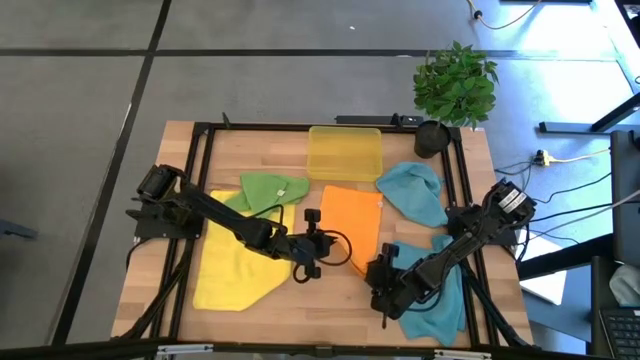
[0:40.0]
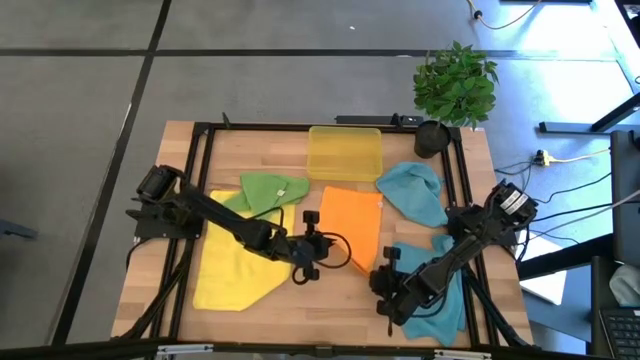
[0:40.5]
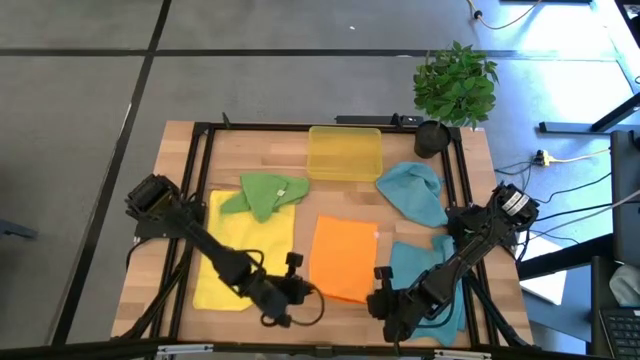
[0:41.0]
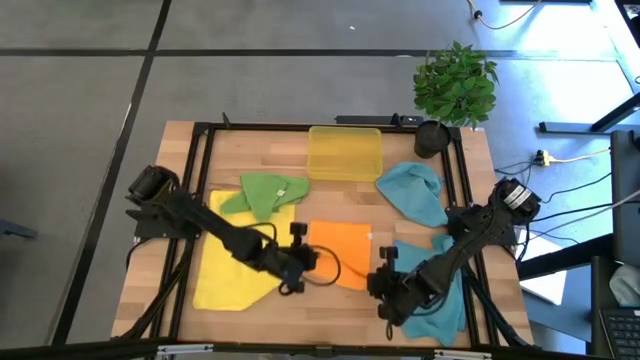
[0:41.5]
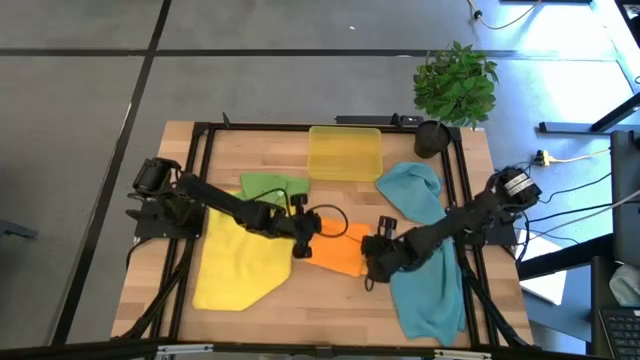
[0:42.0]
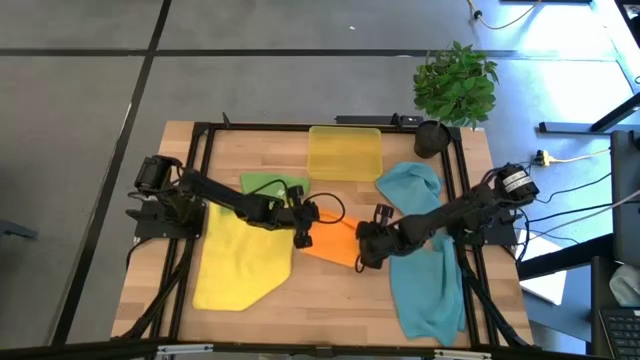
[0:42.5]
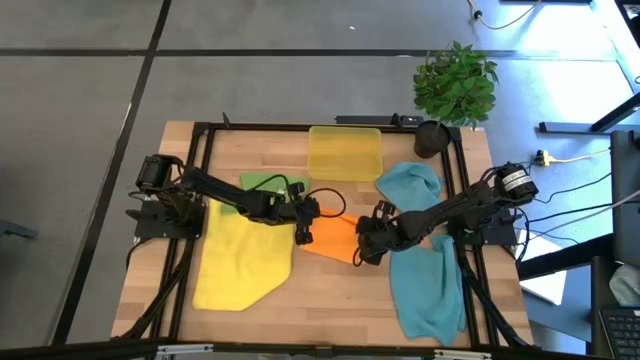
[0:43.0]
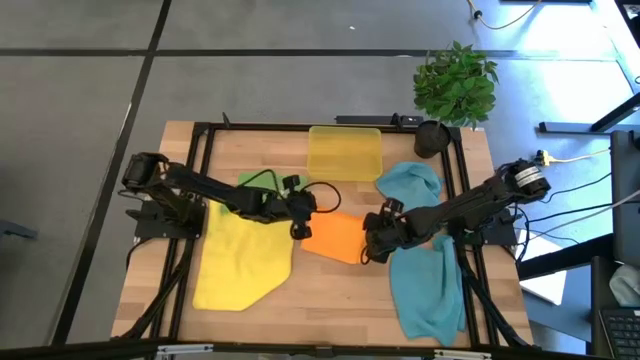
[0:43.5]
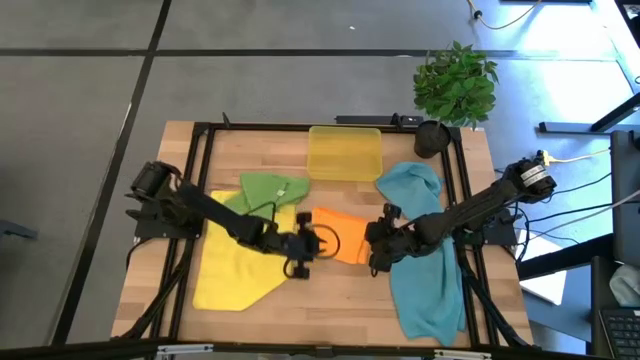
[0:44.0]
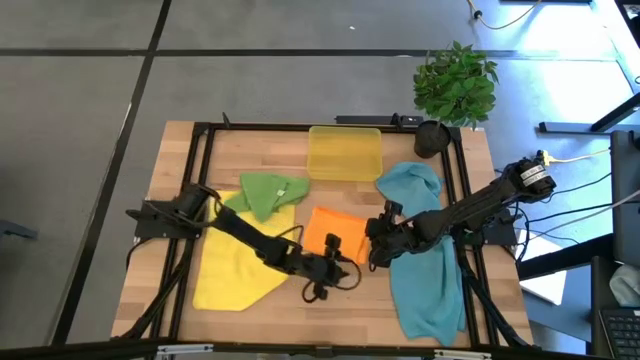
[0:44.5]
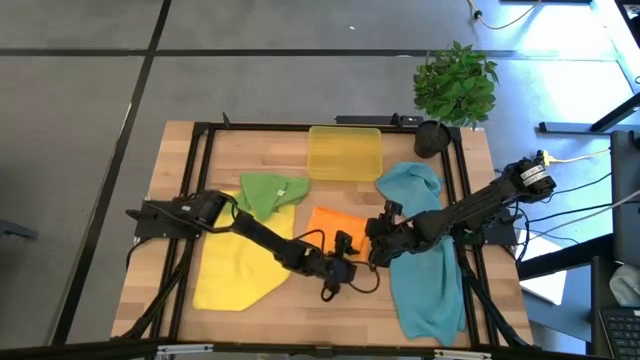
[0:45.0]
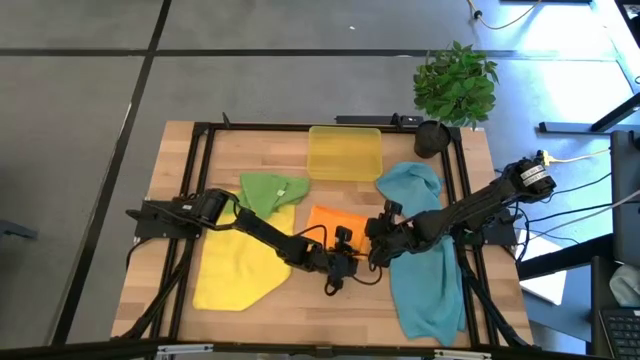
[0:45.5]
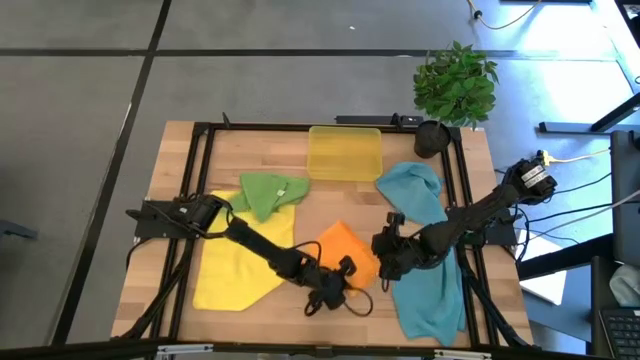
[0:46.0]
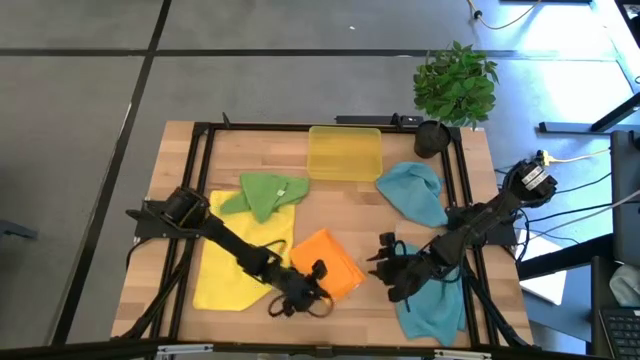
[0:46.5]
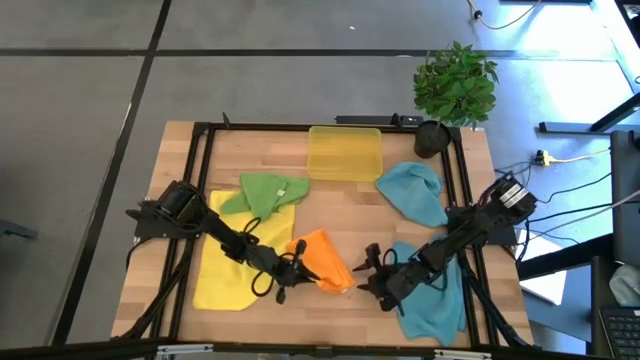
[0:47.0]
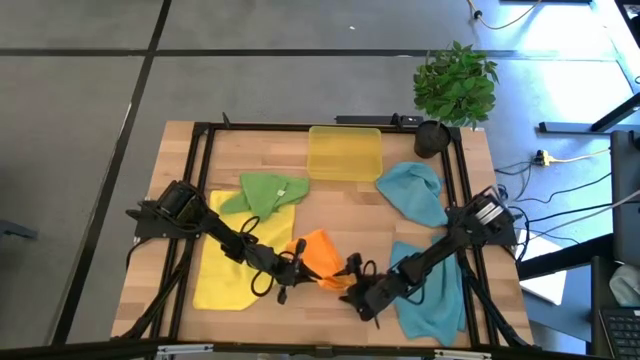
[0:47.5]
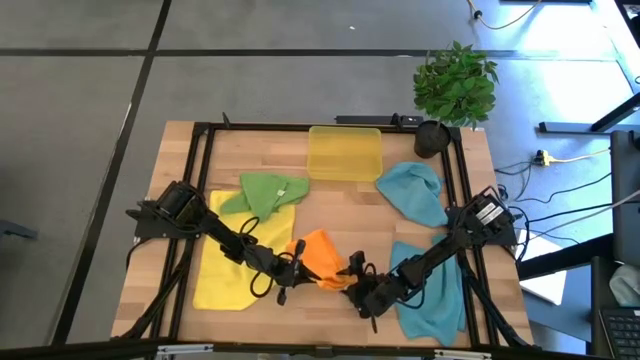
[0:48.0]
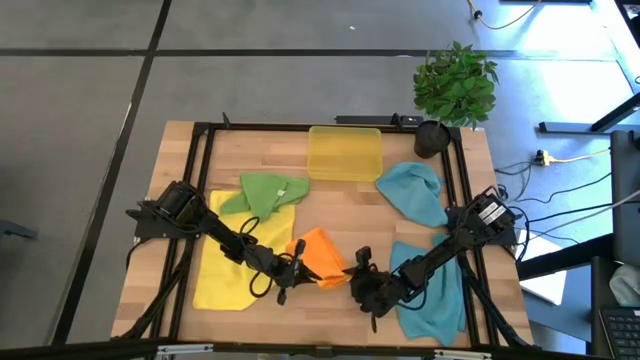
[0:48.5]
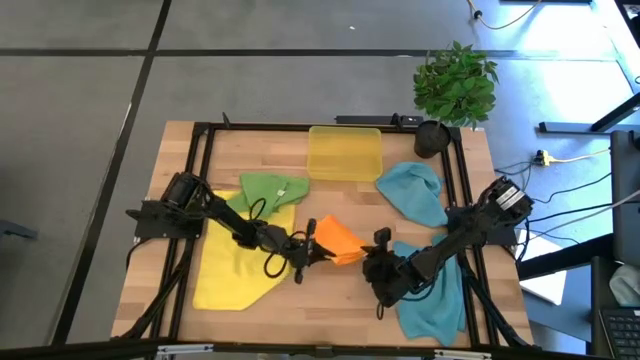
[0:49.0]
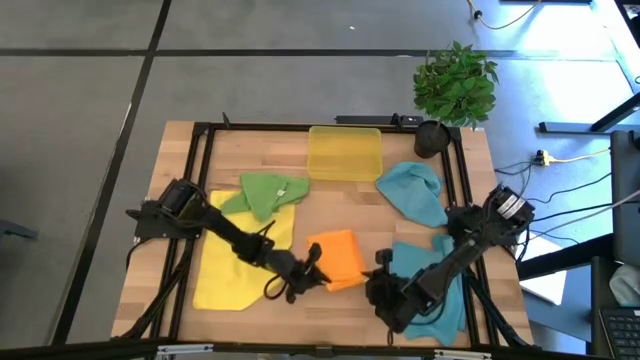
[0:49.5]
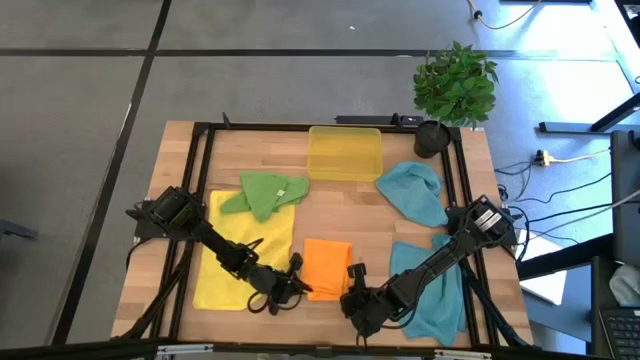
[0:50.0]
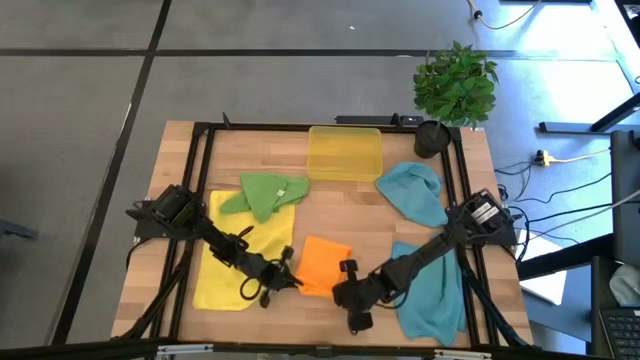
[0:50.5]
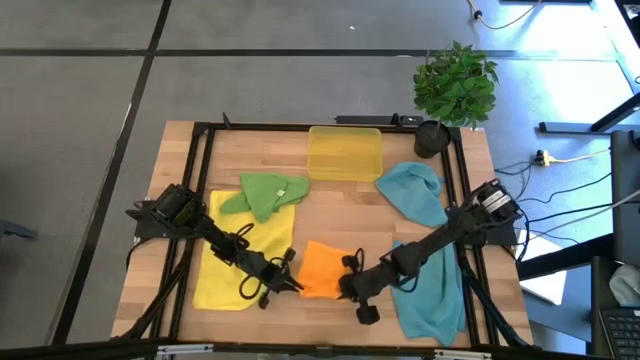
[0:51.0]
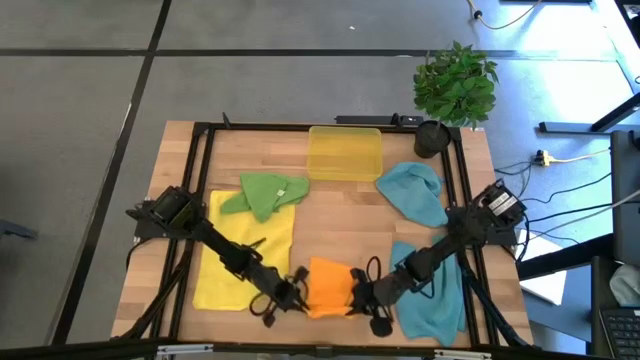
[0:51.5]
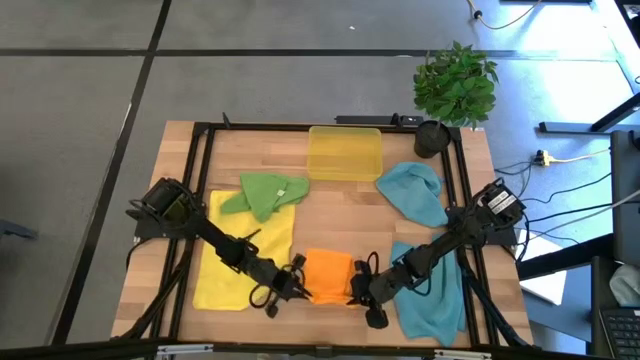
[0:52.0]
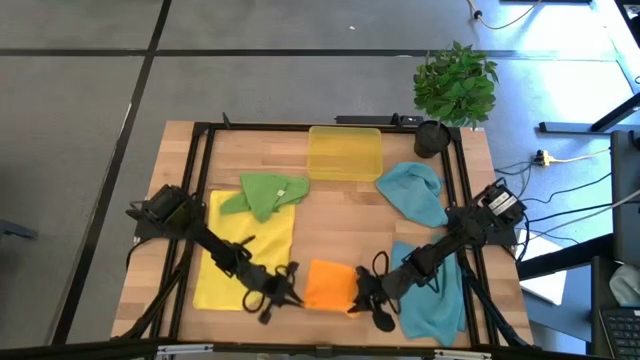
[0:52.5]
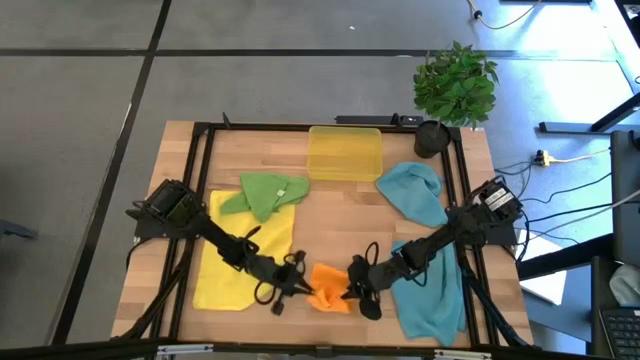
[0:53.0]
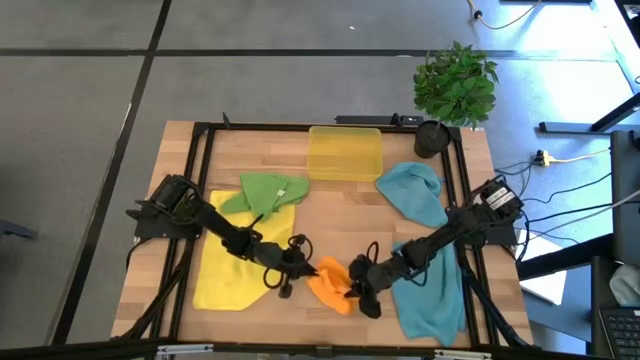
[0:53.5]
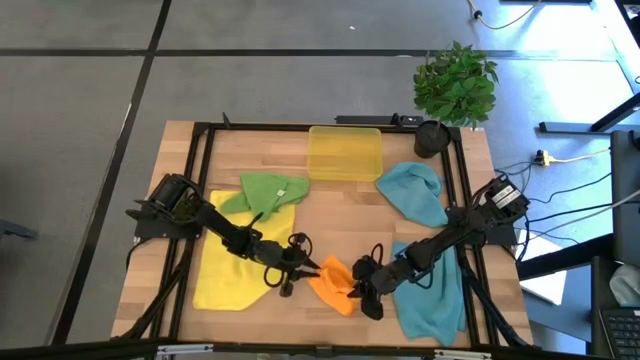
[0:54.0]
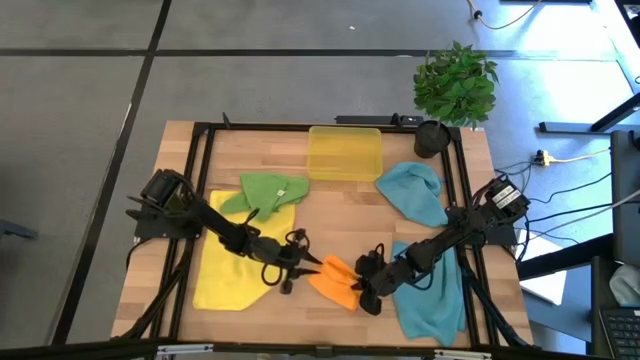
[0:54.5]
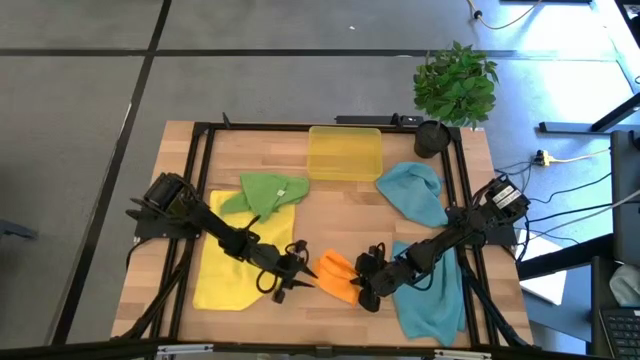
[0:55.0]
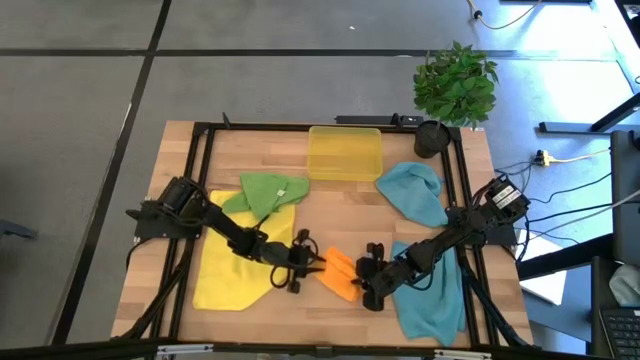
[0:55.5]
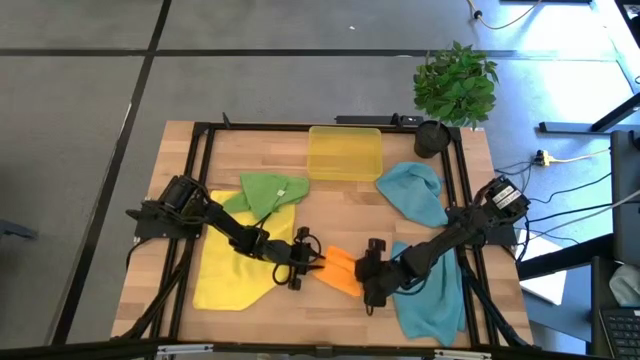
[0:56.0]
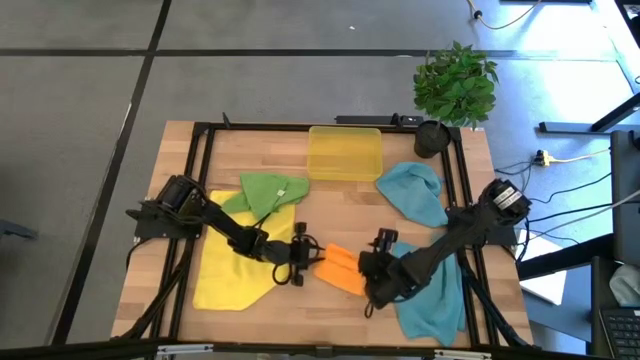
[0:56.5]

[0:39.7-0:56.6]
Task: Fold microfiber towels
Fold the orange microfiber cloth

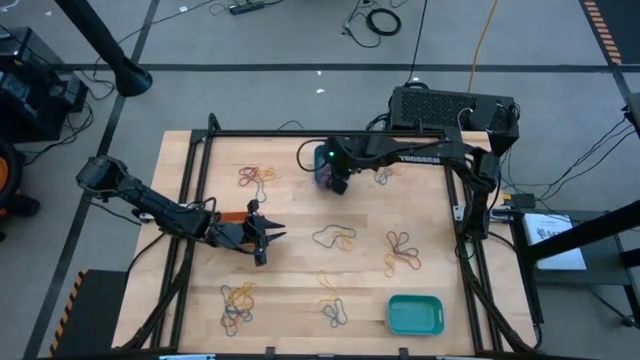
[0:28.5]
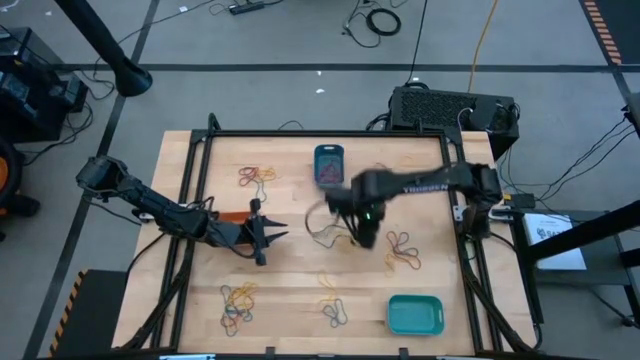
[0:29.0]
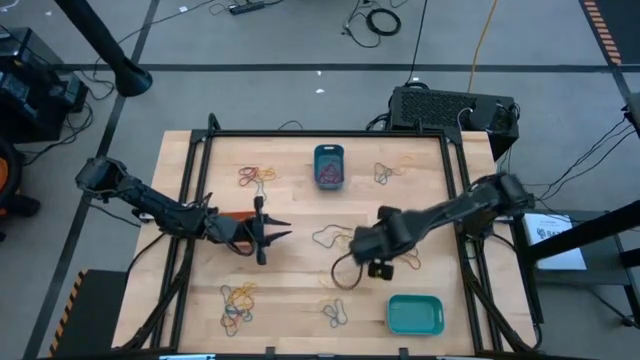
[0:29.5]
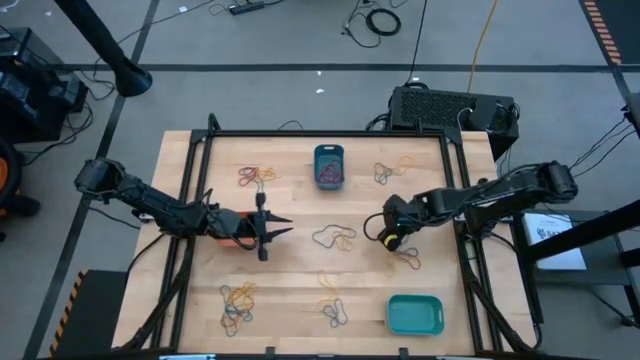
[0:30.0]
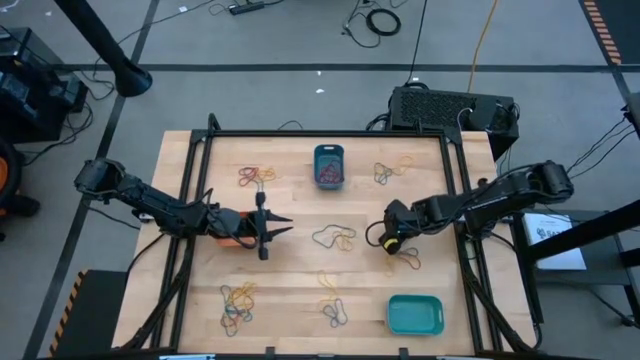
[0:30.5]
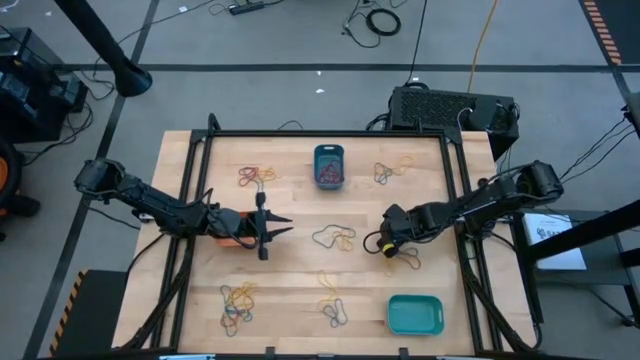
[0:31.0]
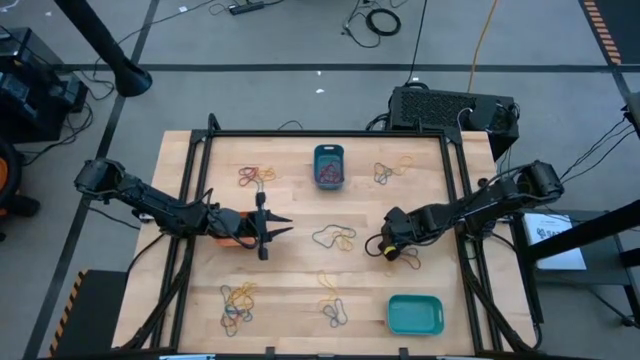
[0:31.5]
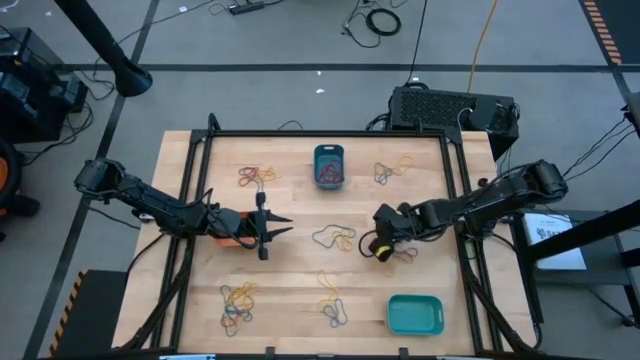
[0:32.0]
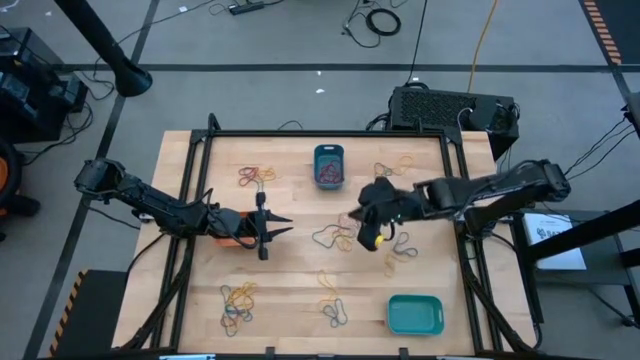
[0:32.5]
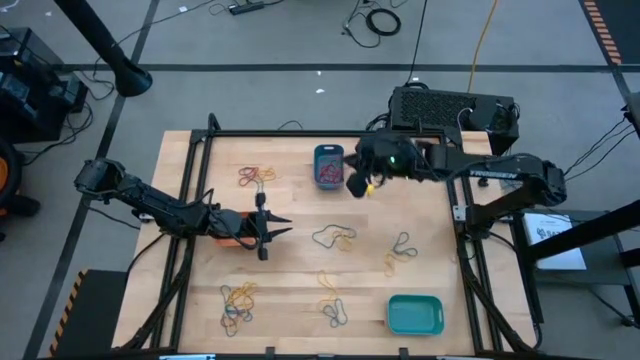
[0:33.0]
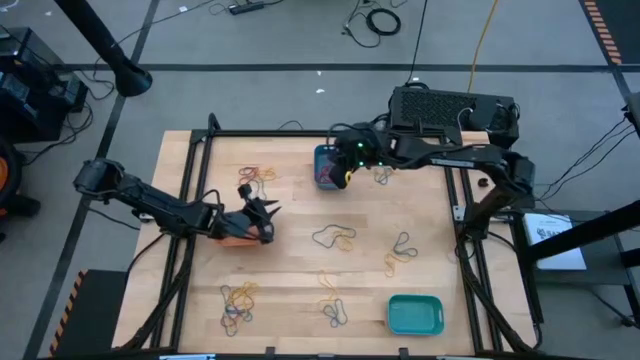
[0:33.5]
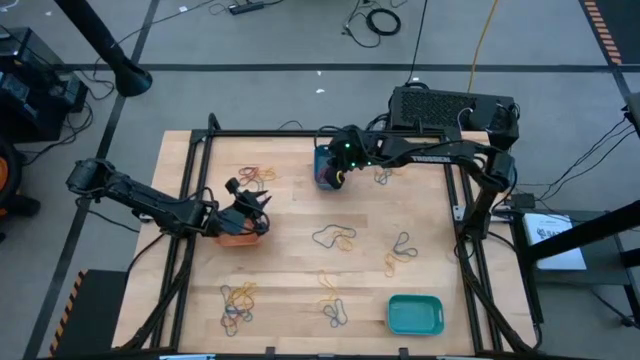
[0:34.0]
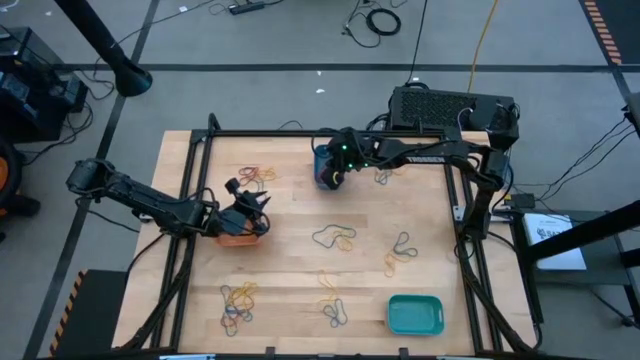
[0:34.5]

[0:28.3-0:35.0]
Task: Sort rubber bands into baskets
Put the middle right red rubber band into the blue bin
